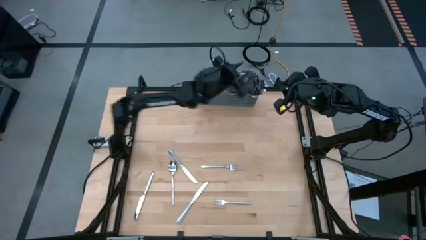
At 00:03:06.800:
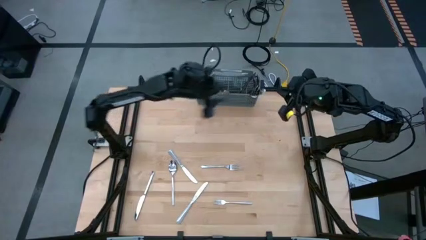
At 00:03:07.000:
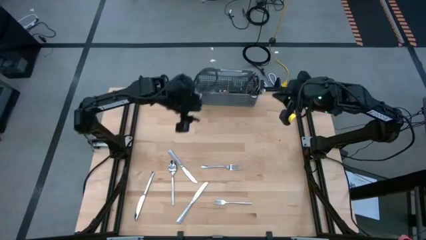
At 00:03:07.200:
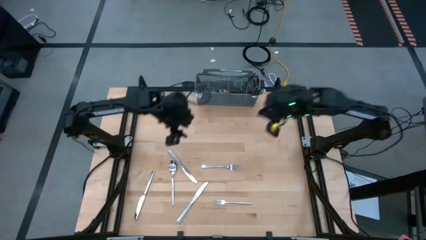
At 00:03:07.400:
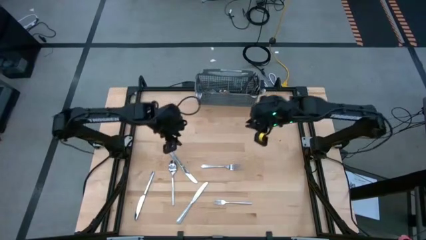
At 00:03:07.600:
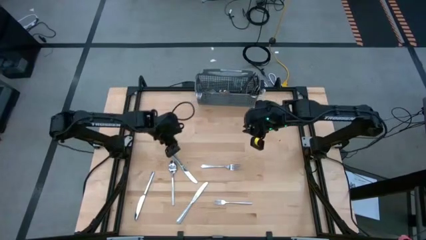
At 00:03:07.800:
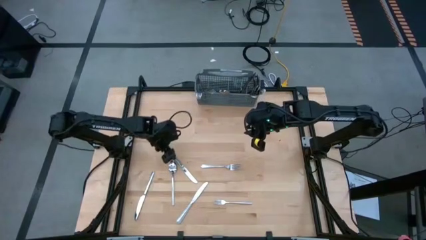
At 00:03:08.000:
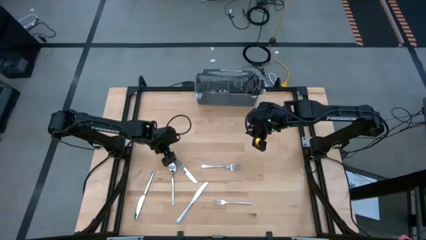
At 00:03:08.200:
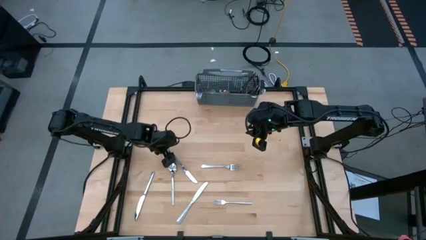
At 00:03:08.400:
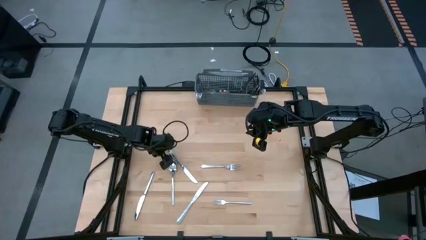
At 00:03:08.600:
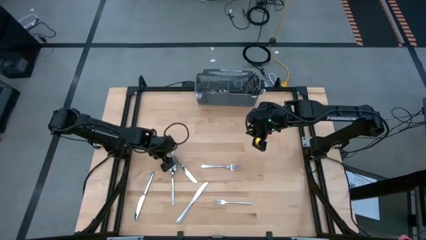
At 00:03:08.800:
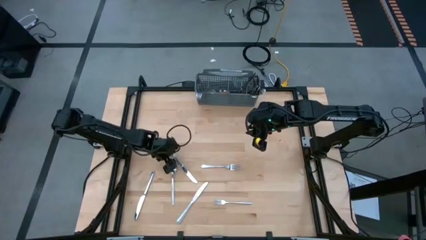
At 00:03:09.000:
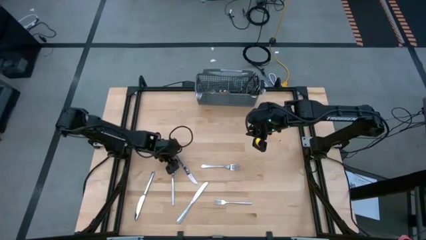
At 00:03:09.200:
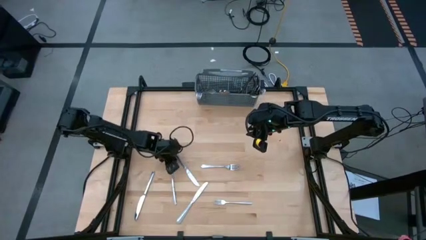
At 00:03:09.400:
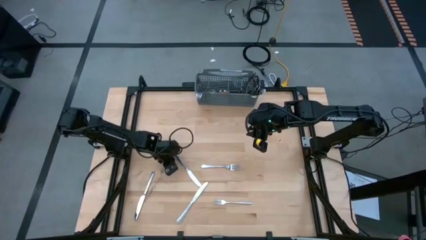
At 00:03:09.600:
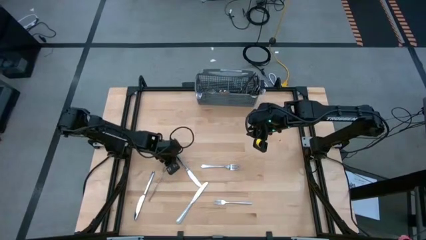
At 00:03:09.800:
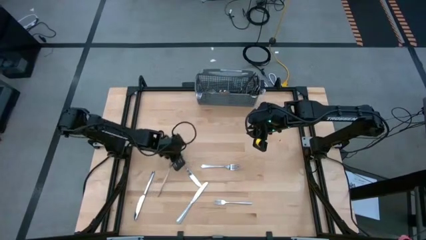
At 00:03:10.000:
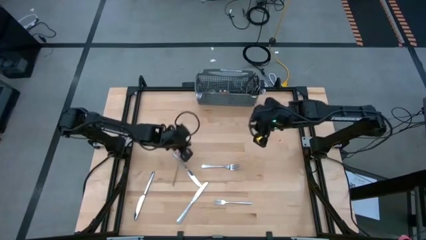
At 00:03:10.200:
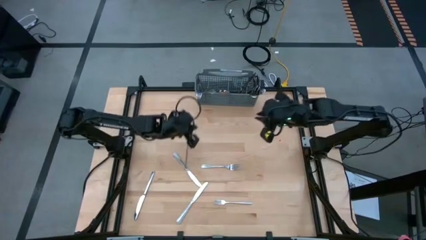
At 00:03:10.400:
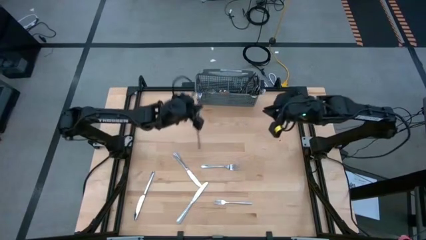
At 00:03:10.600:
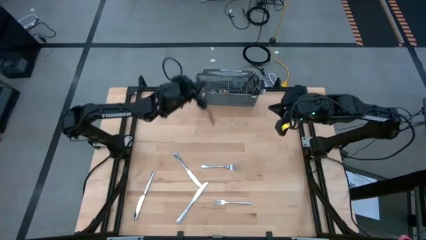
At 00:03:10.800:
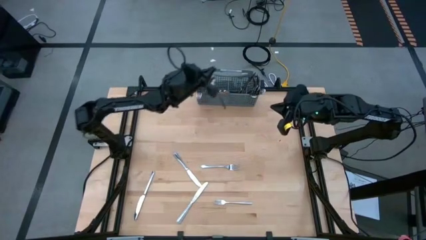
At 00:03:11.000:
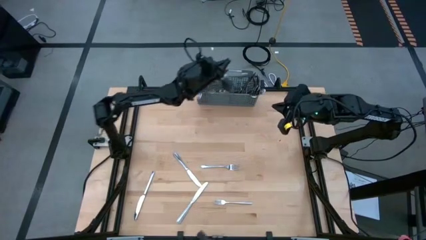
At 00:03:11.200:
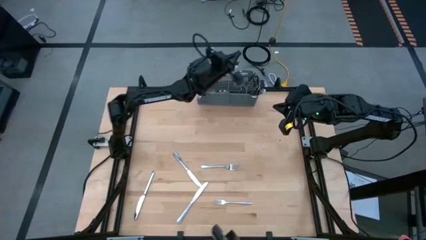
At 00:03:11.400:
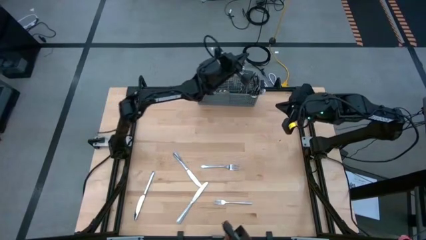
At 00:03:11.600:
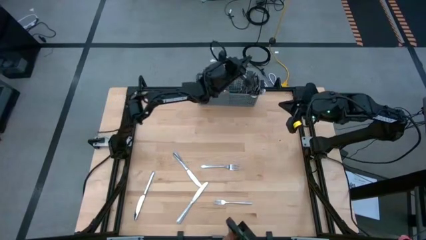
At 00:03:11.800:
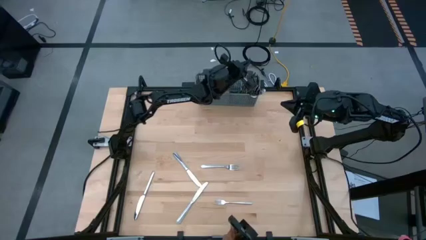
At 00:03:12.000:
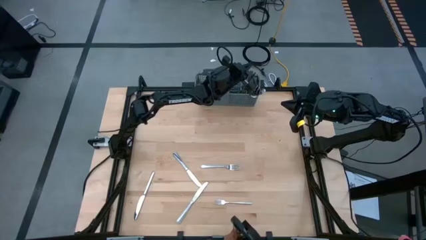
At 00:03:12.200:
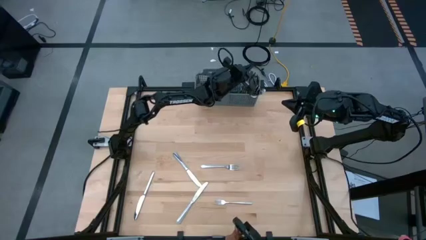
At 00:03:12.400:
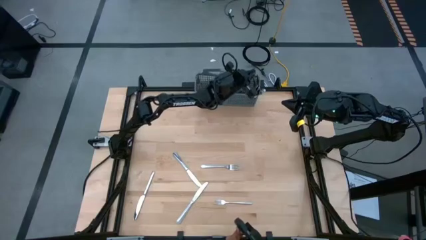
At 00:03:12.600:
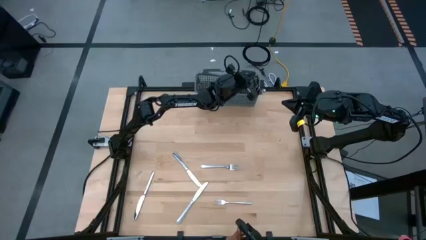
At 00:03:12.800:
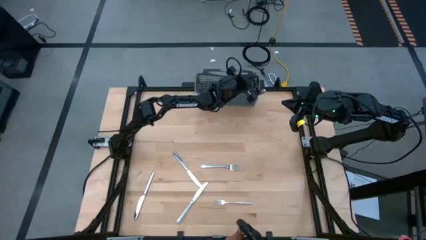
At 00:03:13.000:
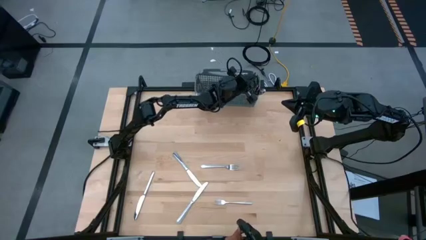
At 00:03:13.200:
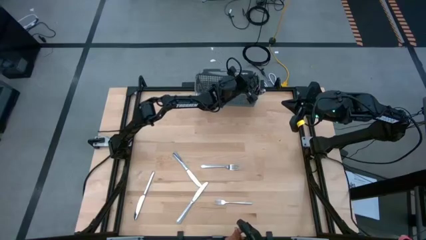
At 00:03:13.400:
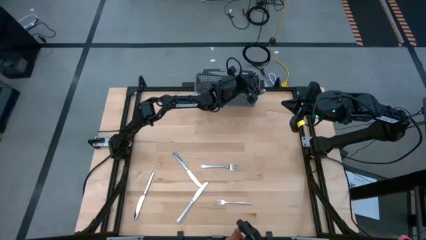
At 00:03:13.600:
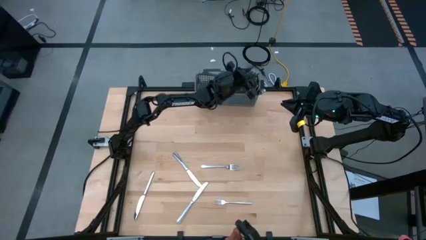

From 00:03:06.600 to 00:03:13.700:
Task: Sort silverware
Put the silver spoon into the silverware organizer

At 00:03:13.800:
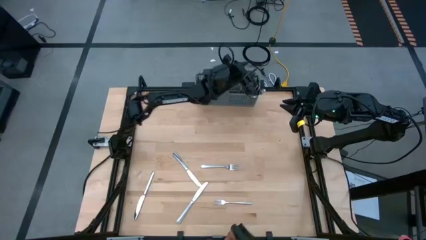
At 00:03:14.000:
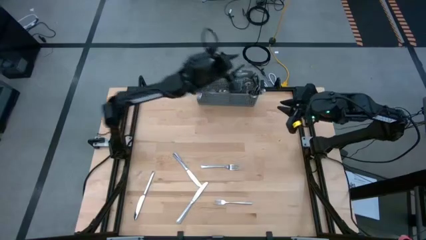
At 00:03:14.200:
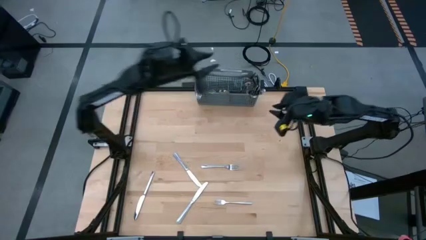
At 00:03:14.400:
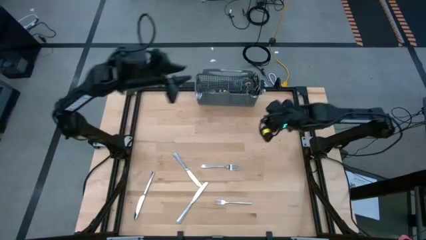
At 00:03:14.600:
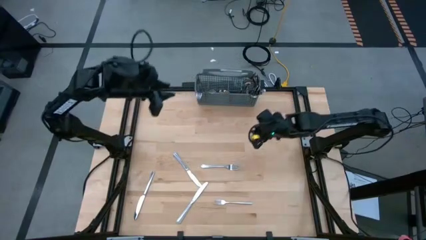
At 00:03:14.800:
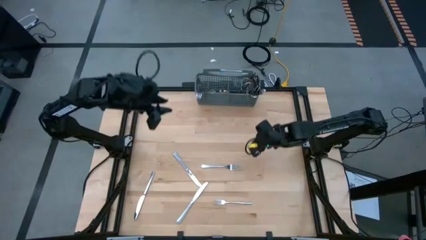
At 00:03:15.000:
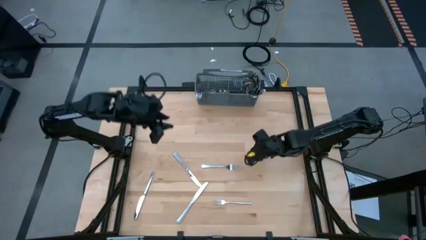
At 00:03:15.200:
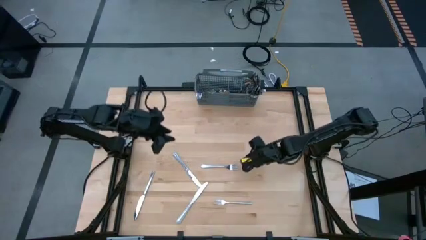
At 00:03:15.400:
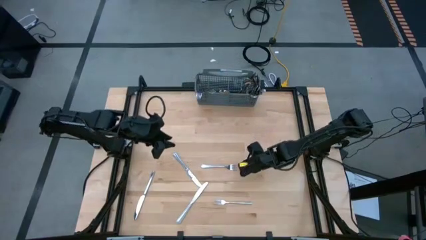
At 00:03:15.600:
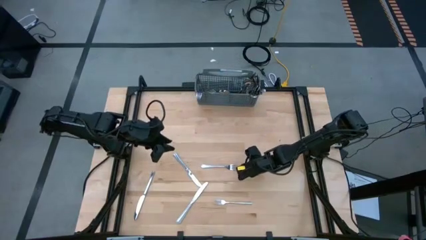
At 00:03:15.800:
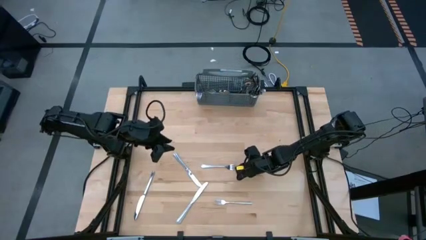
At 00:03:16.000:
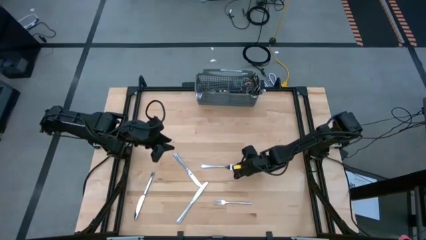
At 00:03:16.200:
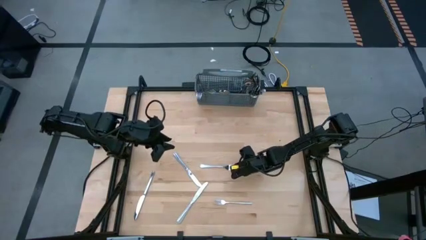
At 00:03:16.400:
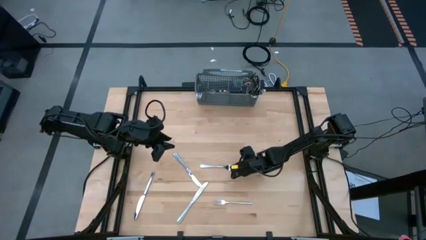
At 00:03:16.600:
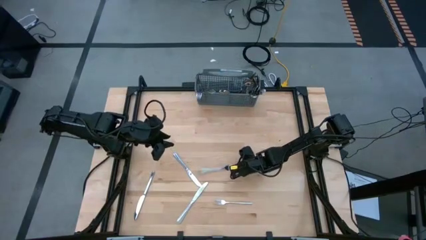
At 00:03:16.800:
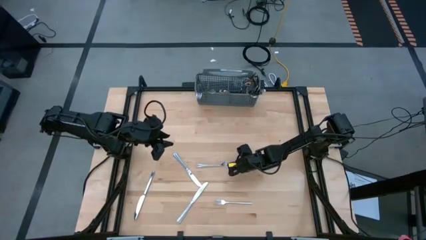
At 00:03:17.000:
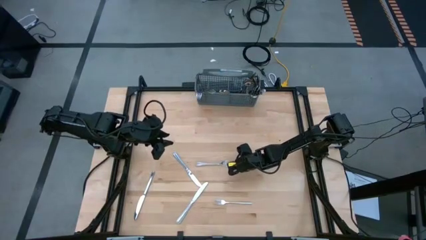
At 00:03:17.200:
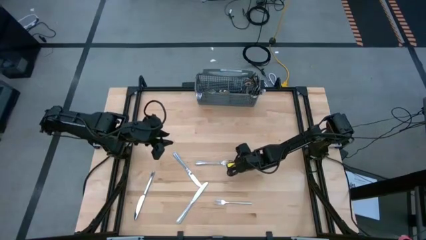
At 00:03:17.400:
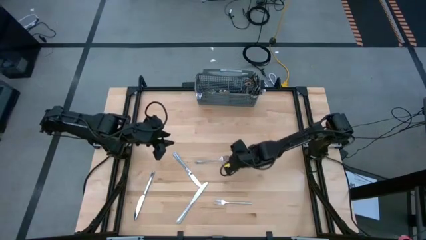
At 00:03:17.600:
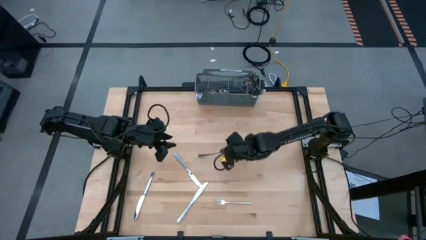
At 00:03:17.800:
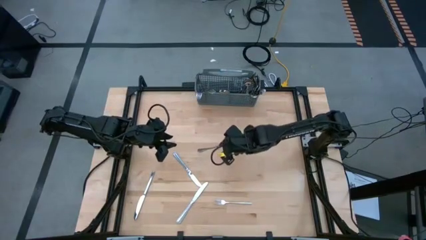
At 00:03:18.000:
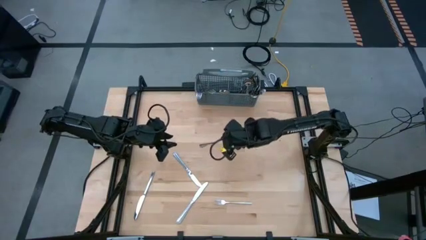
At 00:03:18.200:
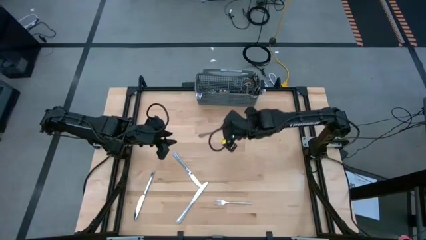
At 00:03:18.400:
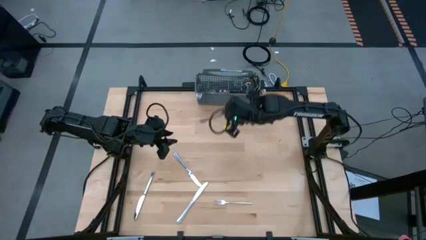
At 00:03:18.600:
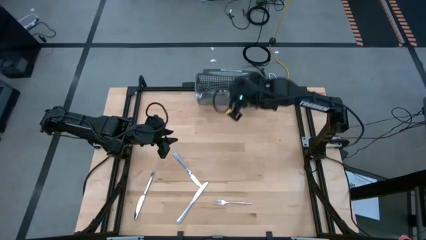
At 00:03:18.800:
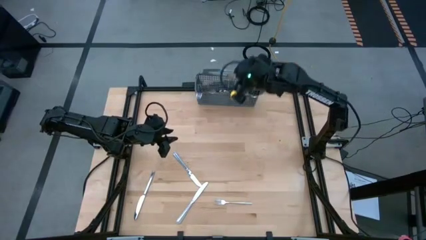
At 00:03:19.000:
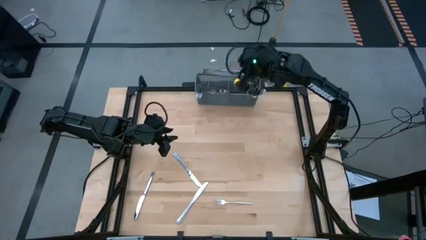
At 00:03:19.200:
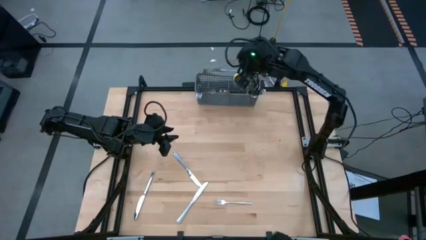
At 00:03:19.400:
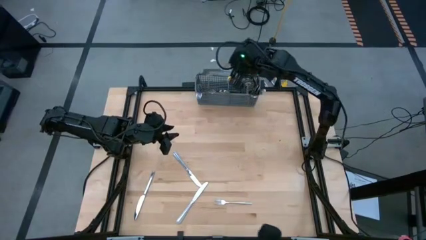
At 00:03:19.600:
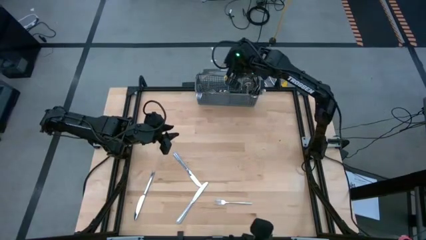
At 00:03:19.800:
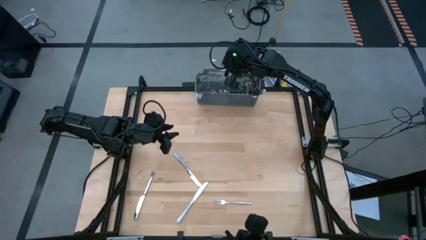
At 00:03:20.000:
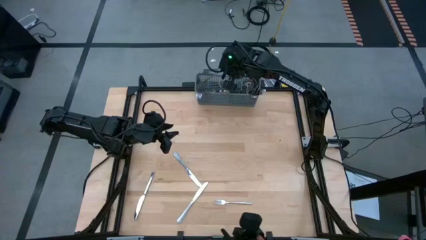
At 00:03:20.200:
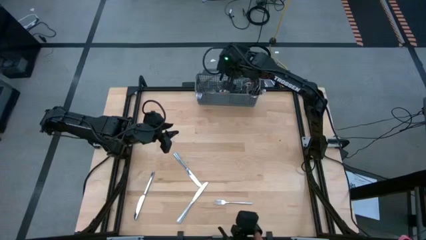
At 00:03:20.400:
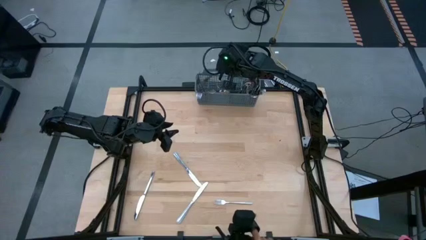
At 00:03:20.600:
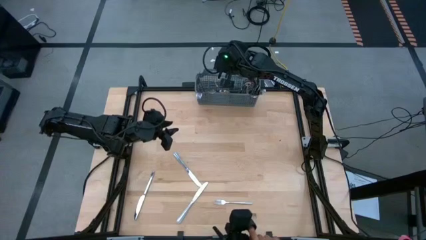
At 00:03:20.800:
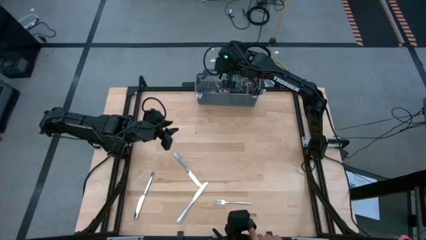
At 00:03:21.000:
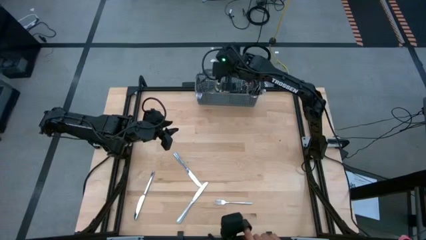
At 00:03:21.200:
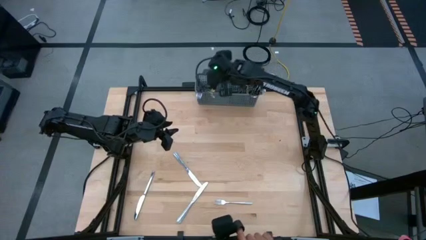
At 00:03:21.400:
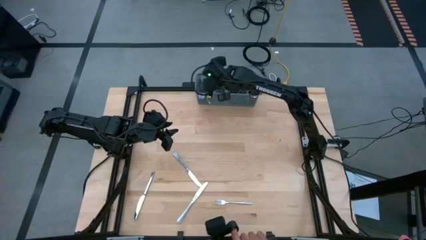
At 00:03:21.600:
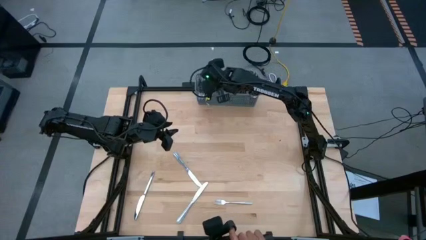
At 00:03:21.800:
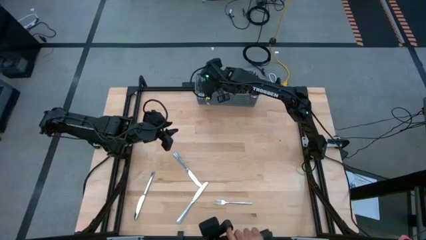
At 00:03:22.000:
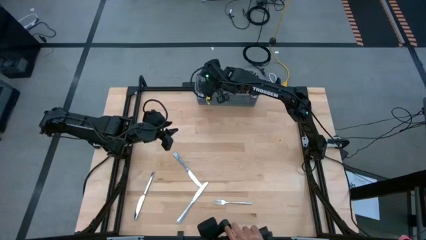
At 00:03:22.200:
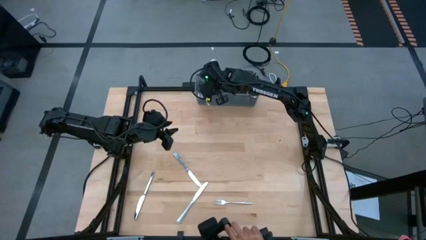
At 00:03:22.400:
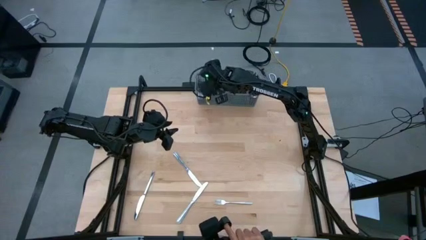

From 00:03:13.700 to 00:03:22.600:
Put the silver fork into the silverware organizer
